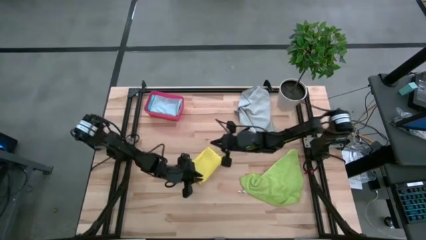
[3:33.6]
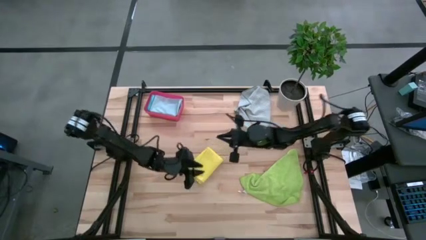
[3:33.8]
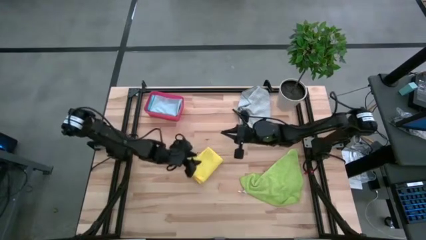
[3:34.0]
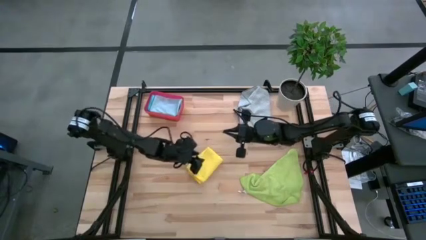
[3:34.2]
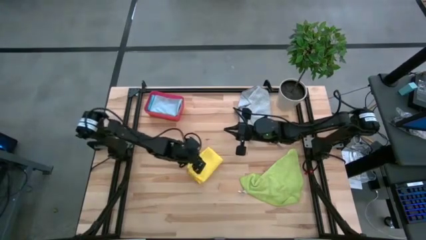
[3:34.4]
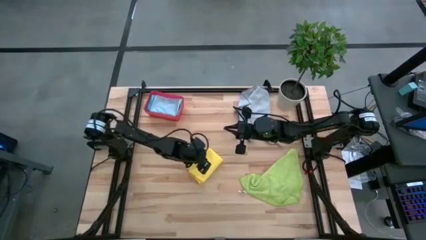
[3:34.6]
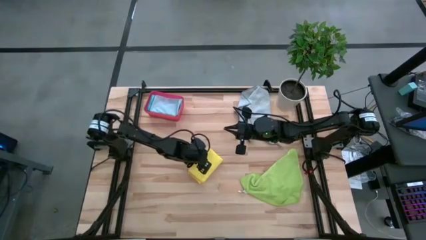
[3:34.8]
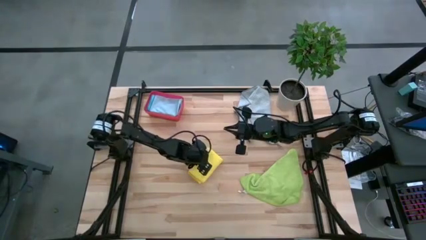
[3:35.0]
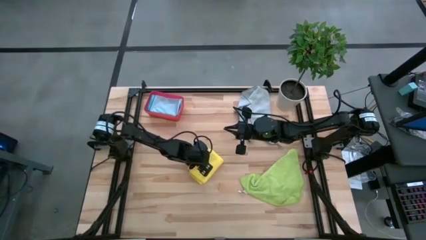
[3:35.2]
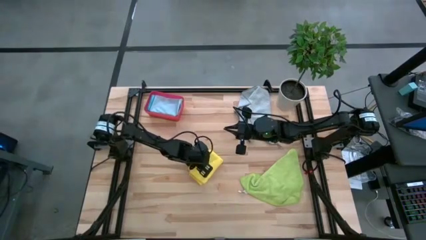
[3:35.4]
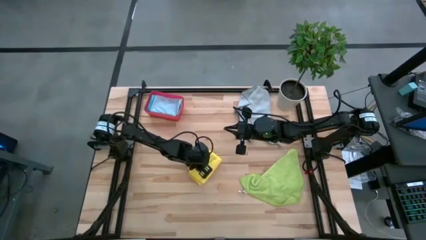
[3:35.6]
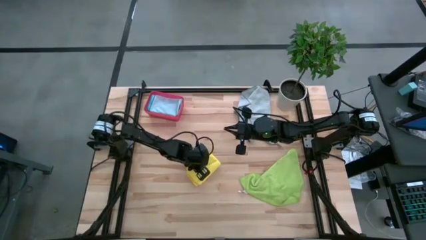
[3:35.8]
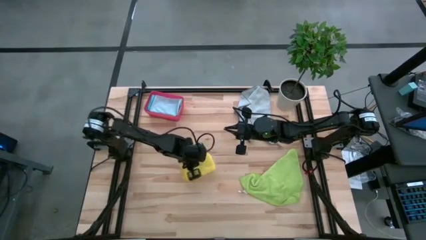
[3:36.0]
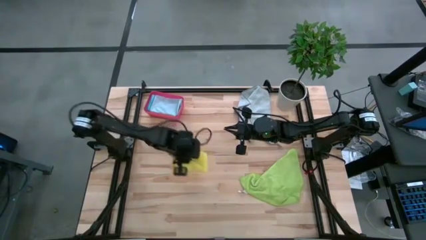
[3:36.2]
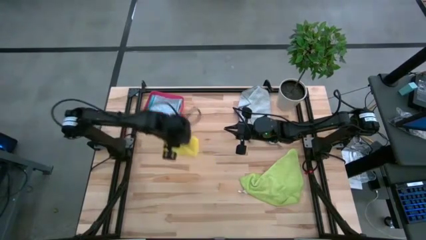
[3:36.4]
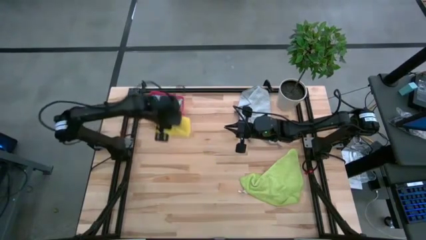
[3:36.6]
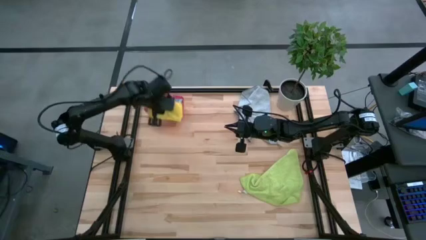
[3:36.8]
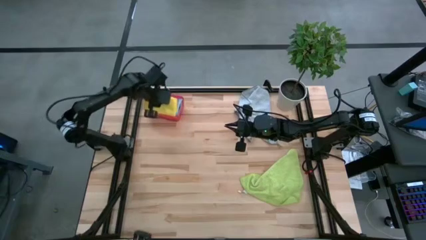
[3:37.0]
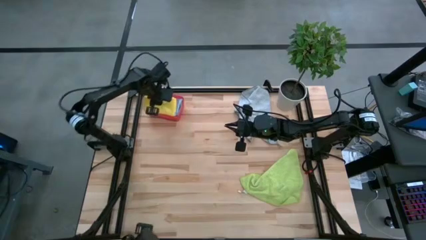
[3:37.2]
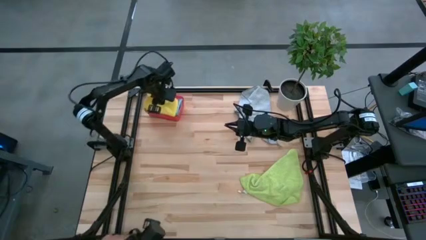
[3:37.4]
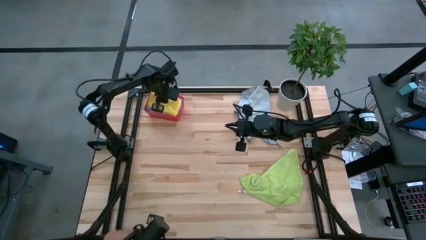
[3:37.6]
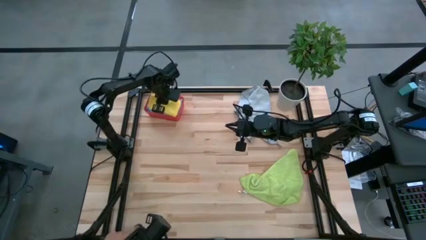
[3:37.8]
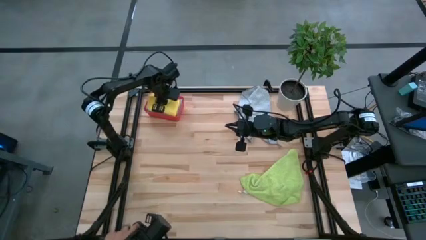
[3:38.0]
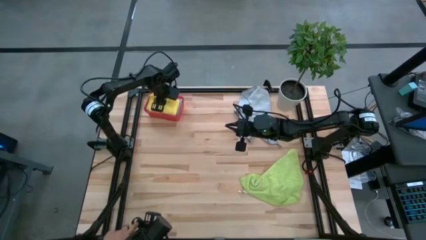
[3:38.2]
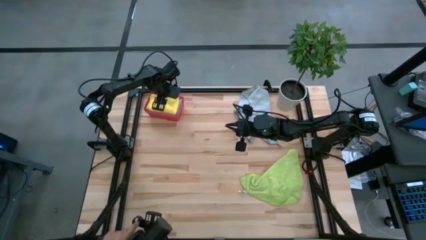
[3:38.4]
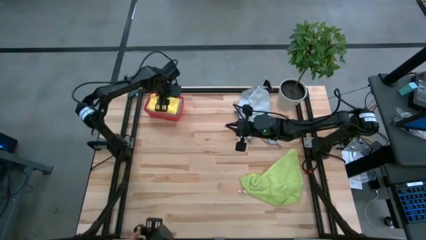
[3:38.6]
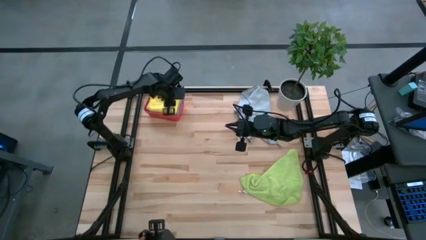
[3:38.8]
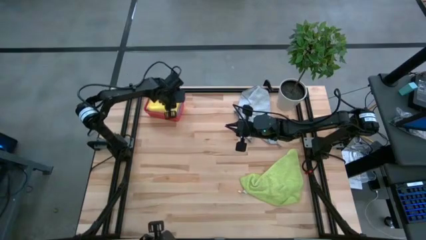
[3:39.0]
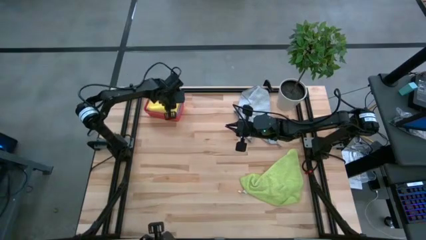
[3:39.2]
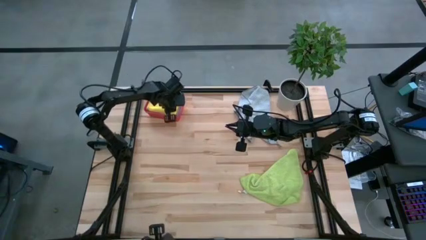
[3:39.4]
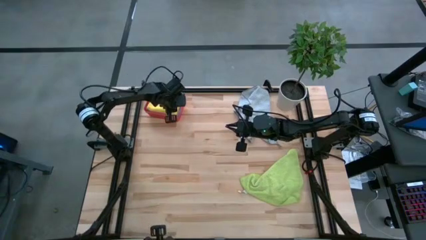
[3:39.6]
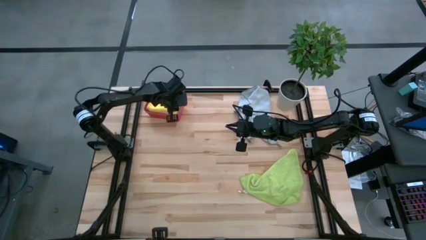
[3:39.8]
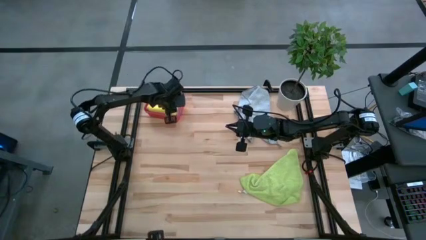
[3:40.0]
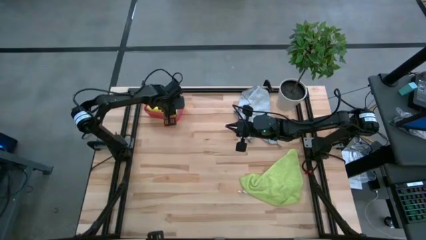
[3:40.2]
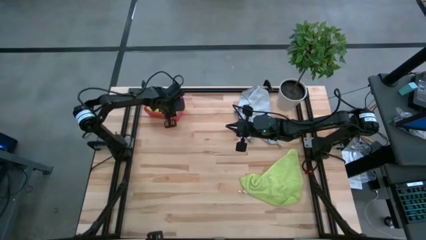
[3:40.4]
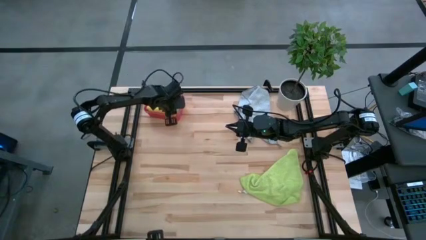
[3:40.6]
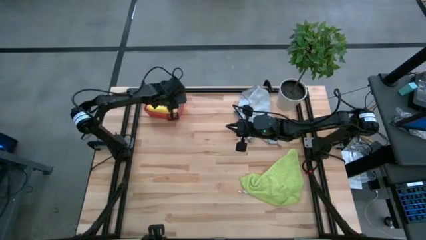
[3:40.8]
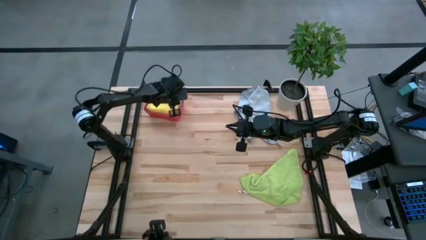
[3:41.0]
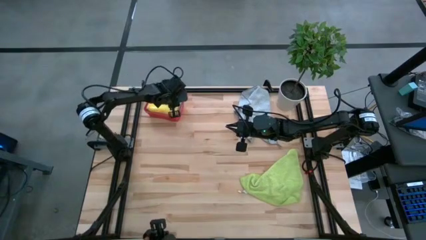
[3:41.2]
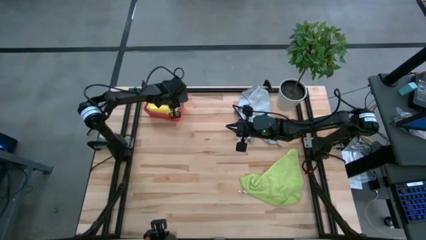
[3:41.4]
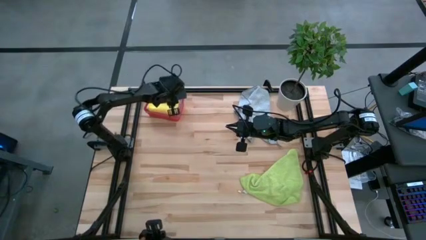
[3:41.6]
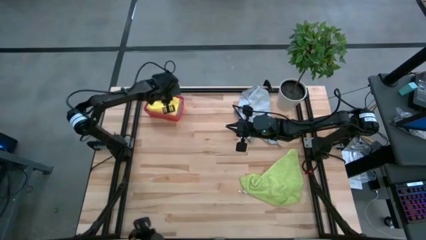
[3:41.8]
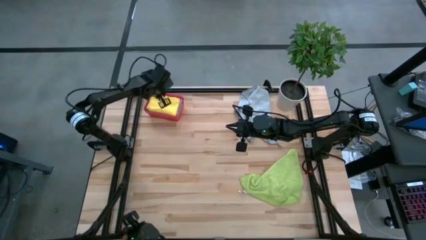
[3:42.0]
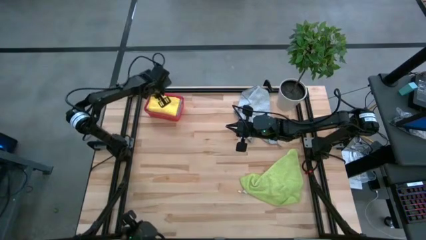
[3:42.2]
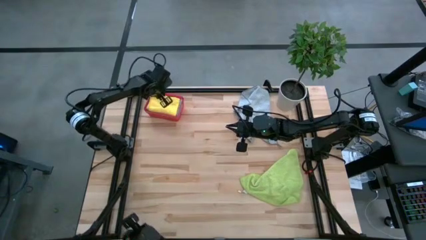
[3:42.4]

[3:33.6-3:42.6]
Task: Fold microfiber towels
Put the folded yellow microfiber cloth into the red bin

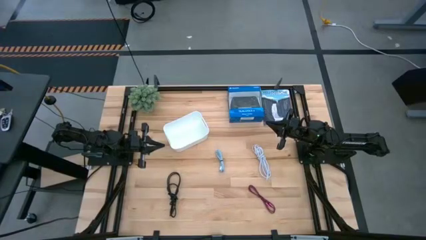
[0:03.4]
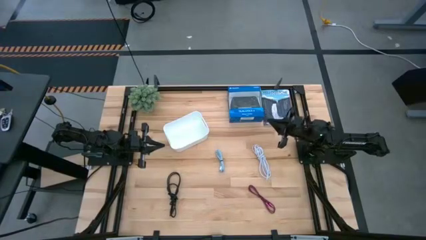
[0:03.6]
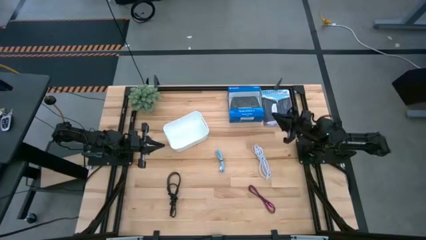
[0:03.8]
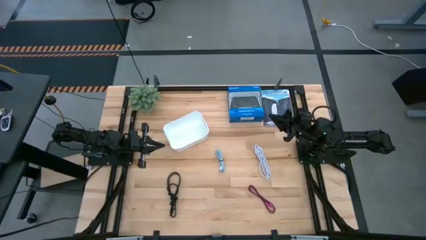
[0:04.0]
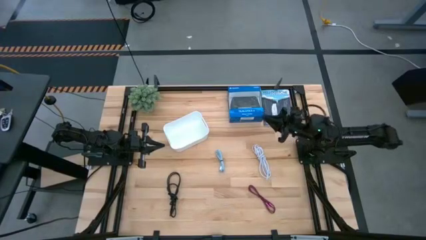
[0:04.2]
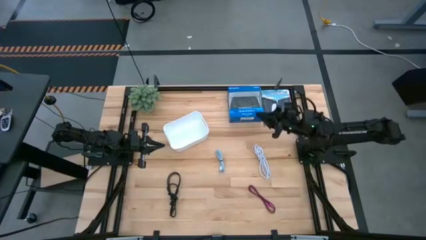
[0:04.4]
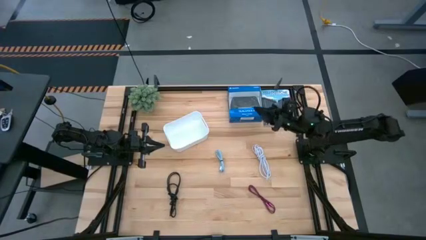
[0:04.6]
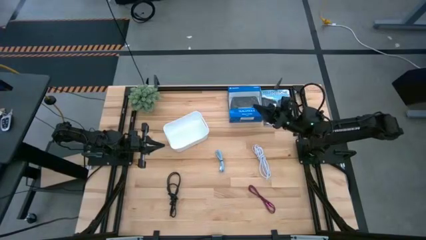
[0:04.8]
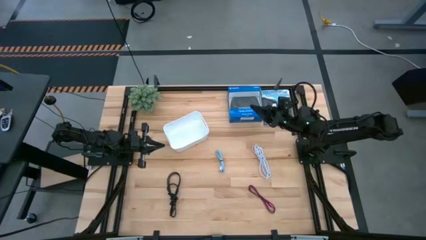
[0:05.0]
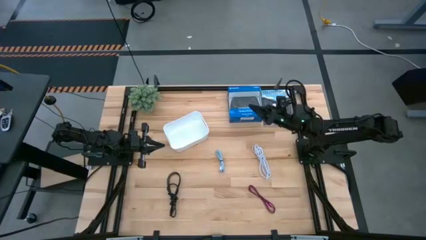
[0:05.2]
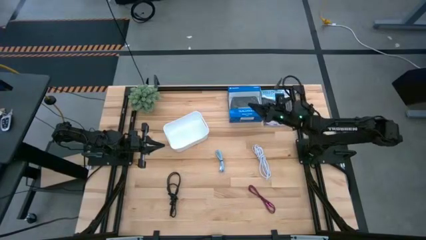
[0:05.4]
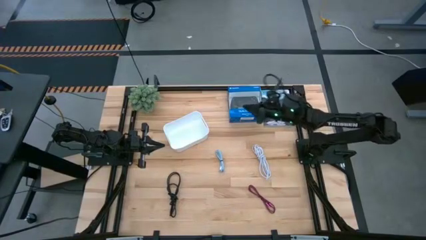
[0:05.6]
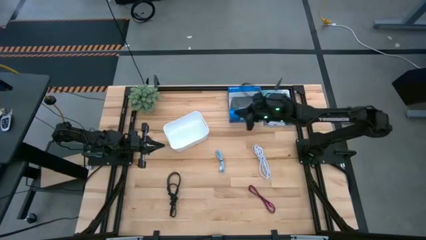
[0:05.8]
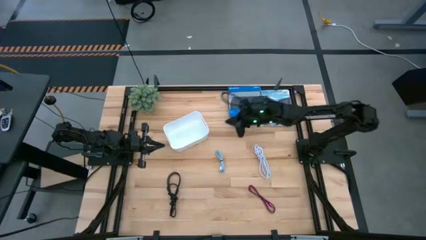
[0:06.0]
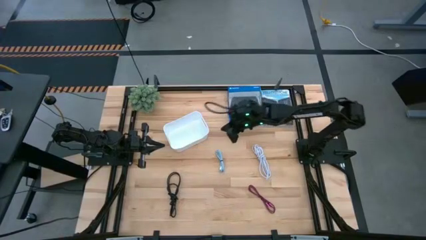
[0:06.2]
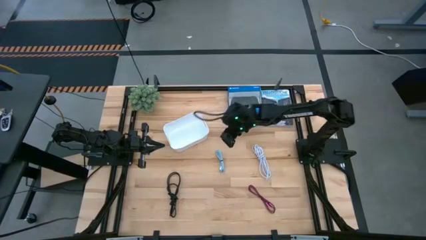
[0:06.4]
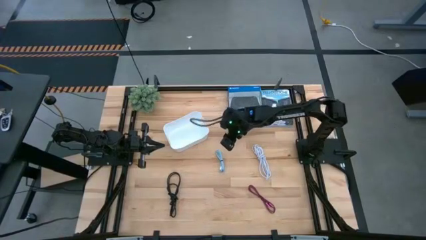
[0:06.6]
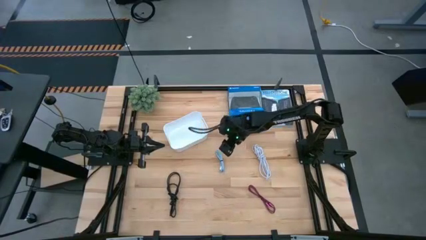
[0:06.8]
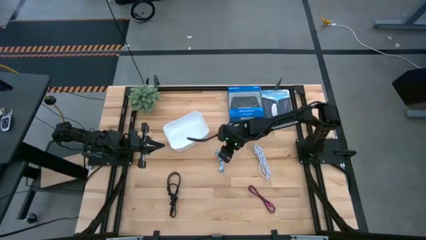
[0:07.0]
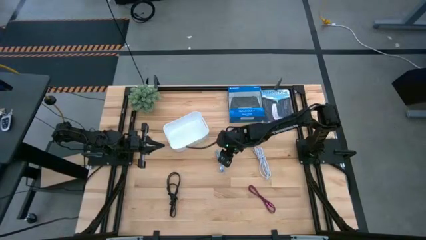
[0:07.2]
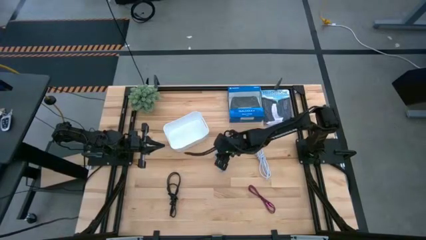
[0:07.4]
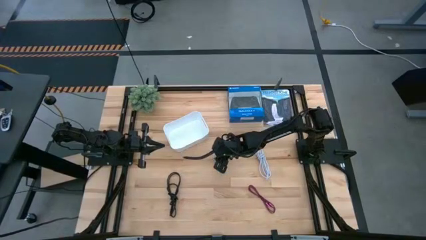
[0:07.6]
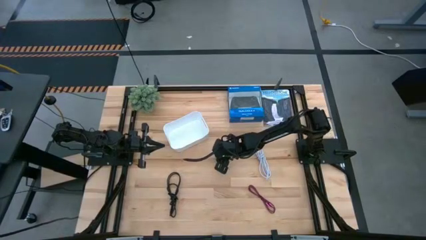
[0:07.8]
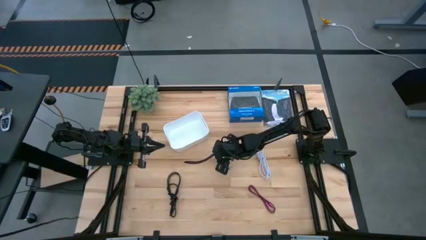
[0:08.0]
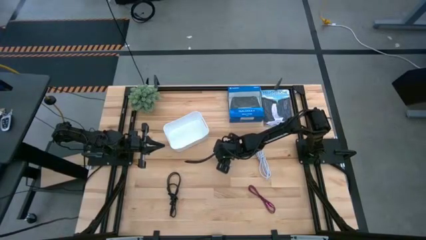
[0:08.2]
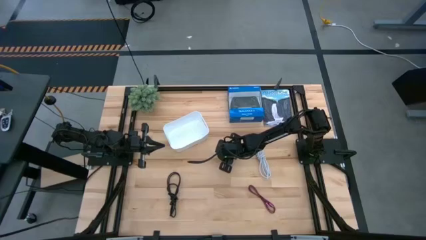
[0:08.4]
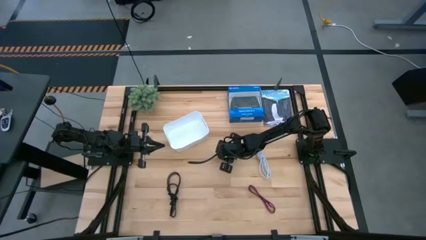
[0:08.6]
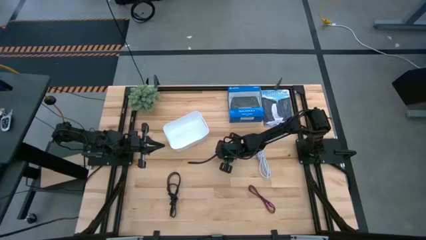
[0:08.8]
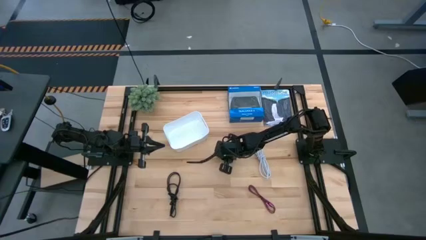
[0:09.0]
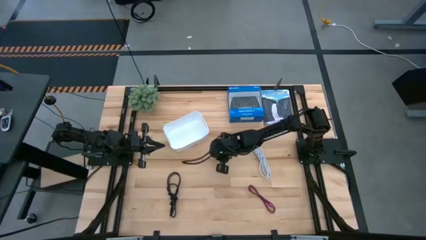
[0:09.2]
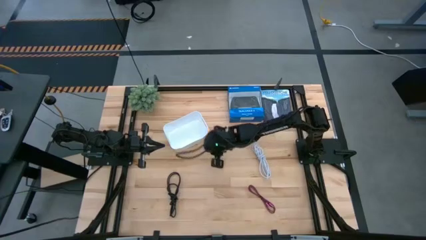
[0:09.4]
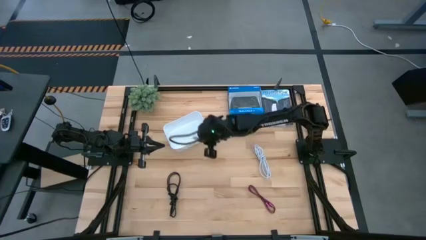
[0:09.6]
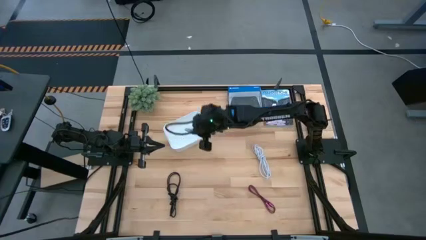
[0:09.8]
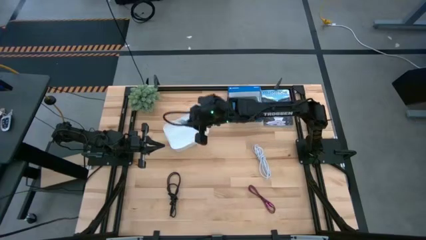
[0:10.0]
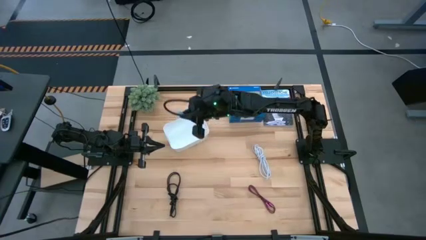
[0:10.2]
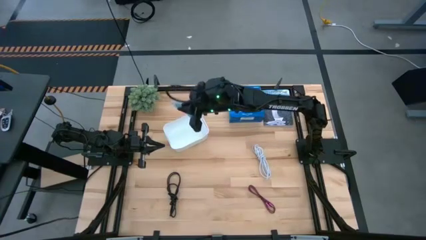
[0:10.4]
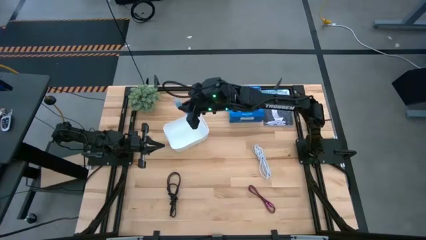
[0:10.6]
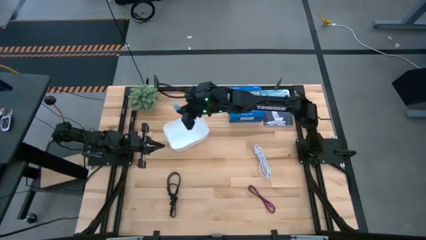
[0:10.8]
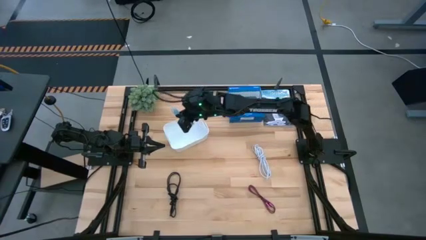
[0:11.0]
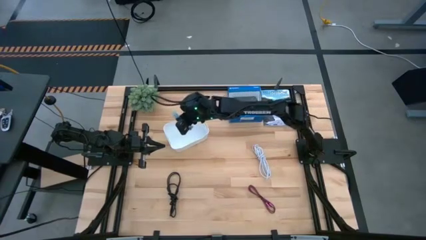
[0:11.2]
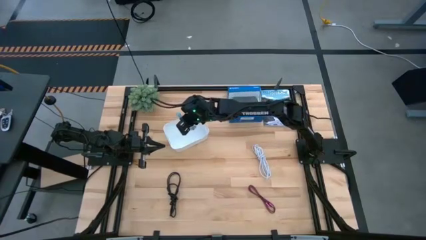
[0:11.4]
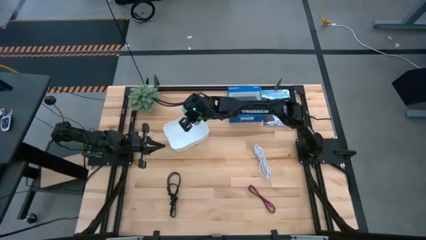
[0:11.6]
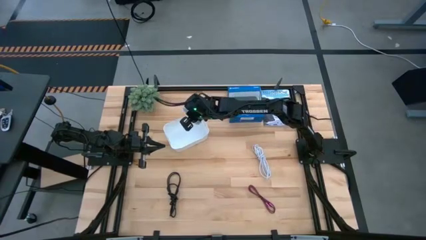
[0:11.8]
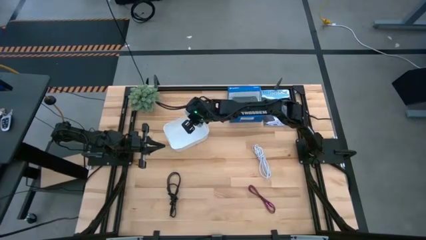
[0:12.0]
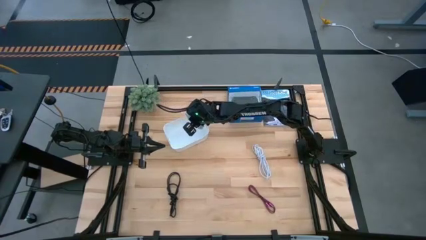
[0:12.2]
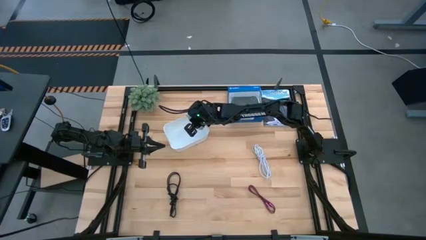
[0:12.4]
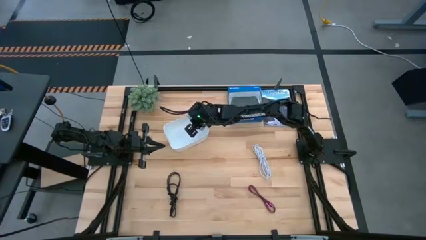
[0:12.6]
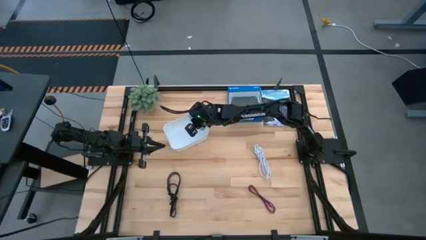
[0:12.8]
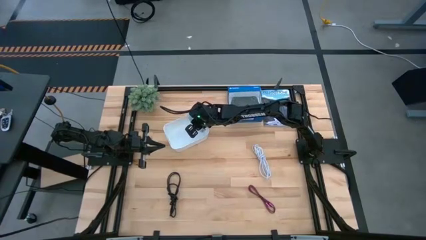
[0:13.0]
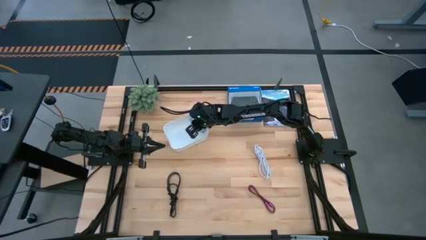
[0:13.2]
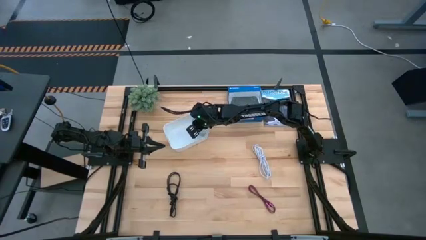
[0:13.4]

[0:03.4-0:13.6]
Task: Pick and place USB-C Cables
Put the blue charger cable into the white bin
